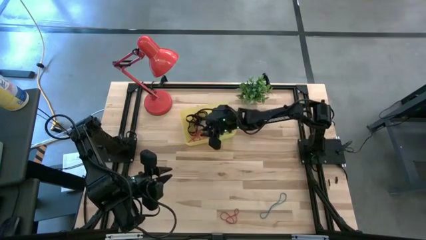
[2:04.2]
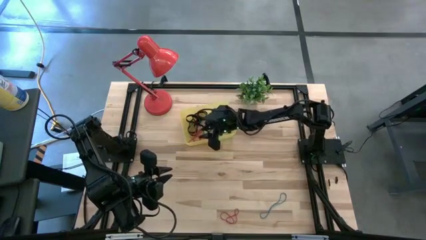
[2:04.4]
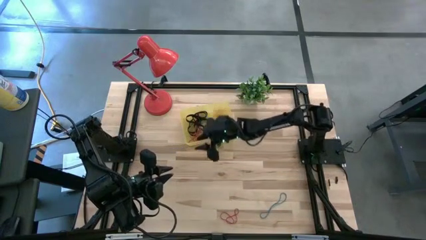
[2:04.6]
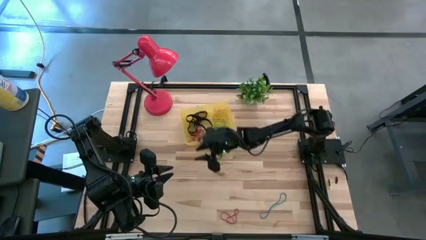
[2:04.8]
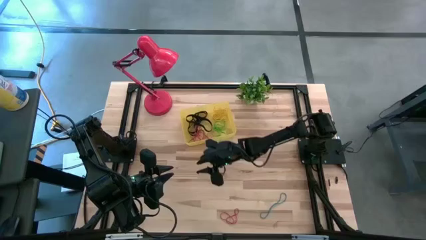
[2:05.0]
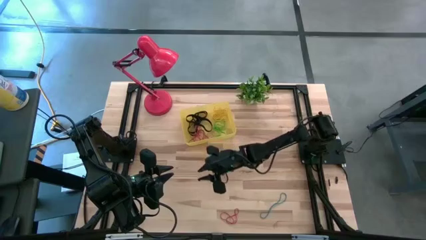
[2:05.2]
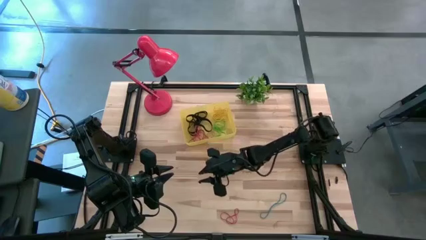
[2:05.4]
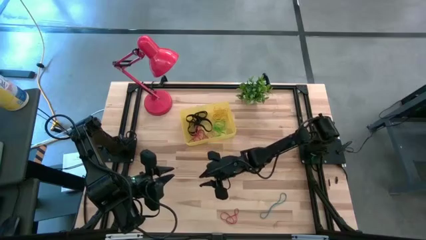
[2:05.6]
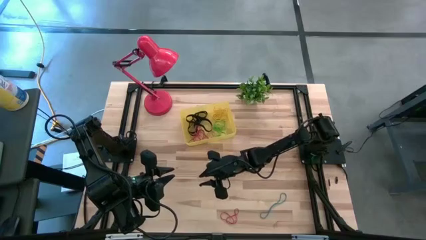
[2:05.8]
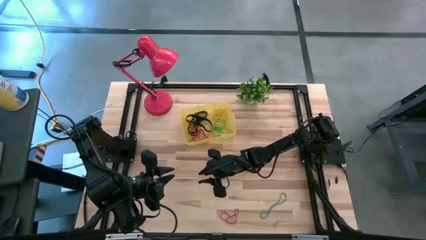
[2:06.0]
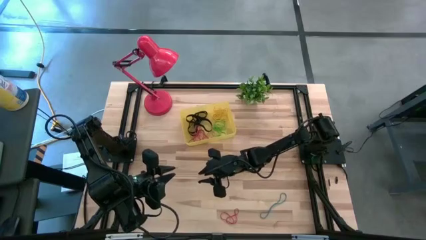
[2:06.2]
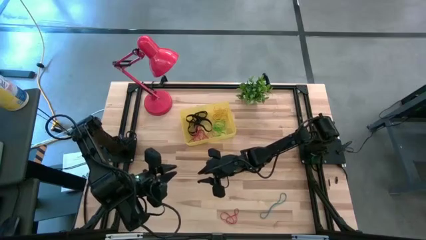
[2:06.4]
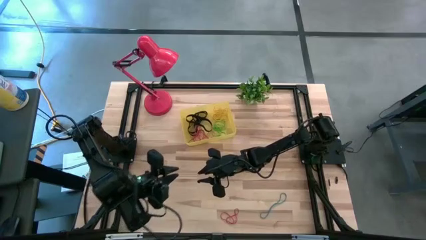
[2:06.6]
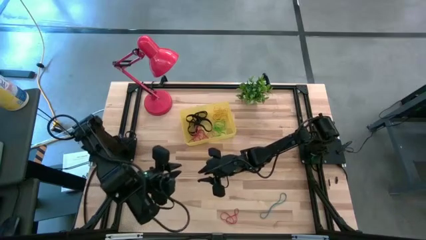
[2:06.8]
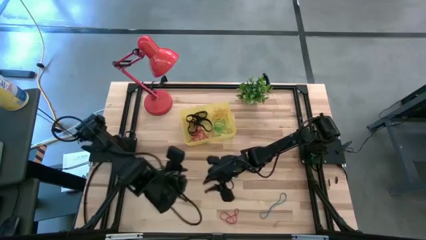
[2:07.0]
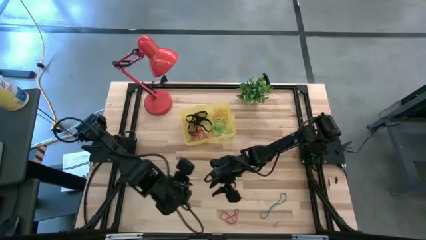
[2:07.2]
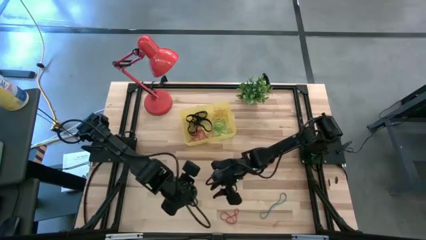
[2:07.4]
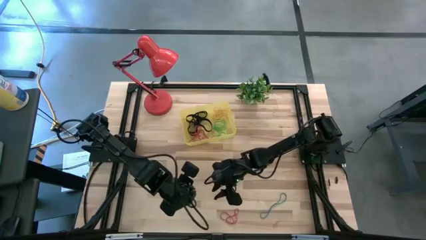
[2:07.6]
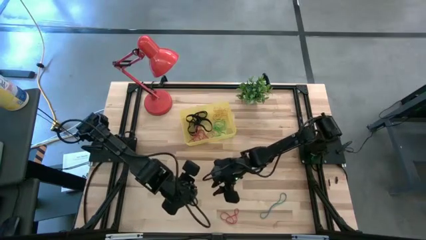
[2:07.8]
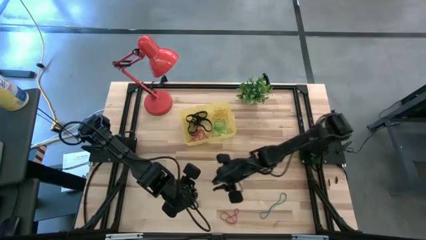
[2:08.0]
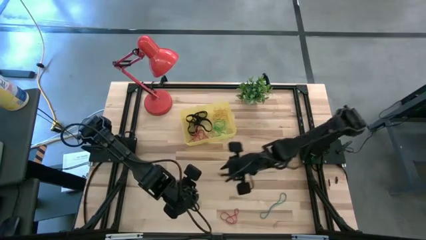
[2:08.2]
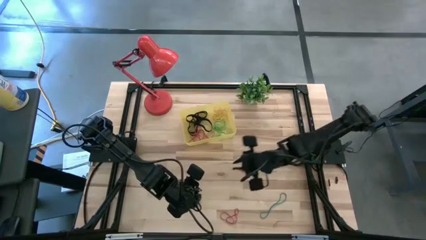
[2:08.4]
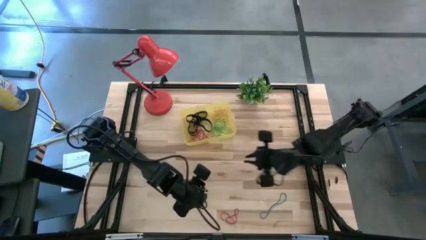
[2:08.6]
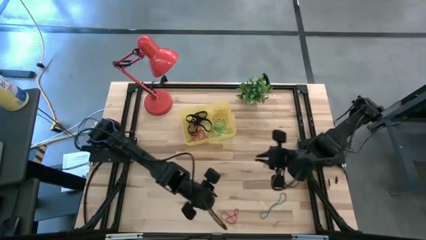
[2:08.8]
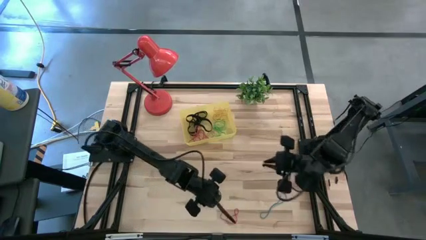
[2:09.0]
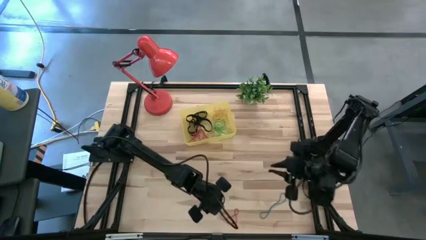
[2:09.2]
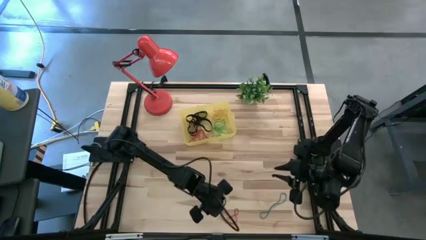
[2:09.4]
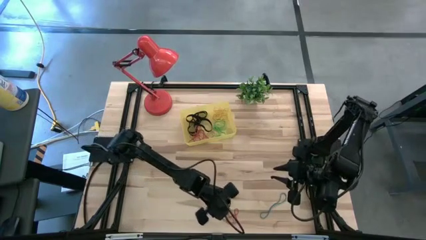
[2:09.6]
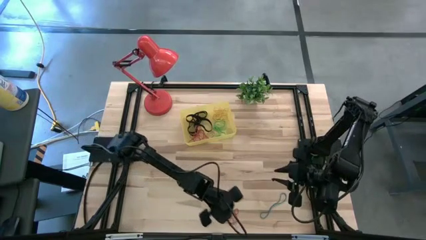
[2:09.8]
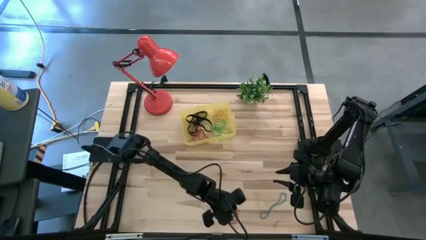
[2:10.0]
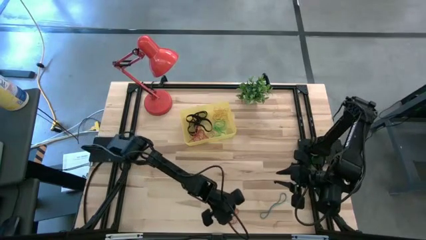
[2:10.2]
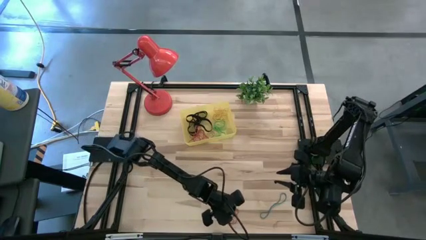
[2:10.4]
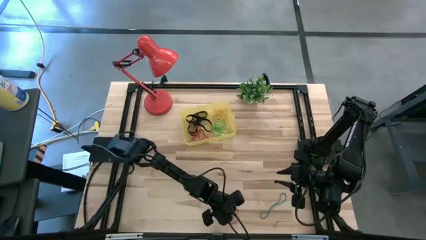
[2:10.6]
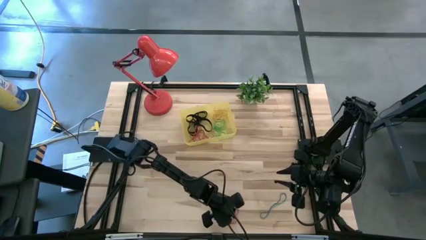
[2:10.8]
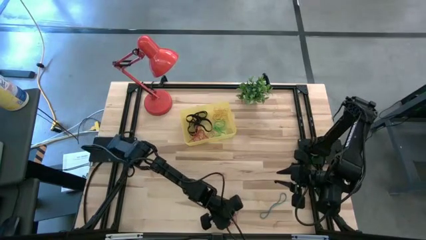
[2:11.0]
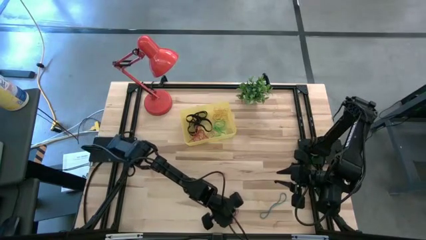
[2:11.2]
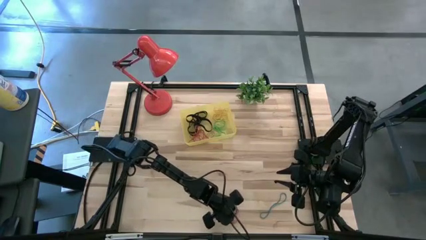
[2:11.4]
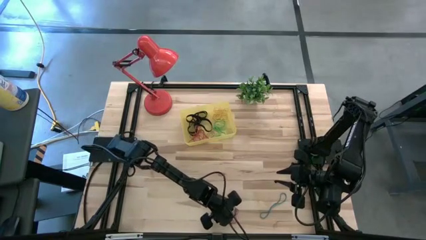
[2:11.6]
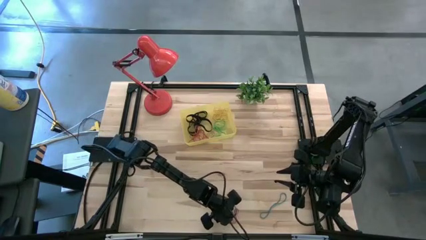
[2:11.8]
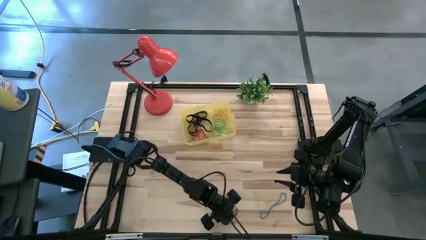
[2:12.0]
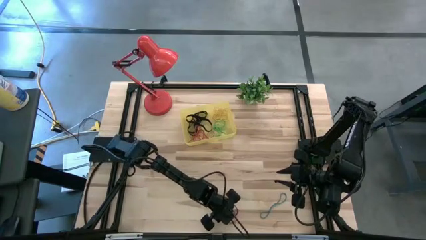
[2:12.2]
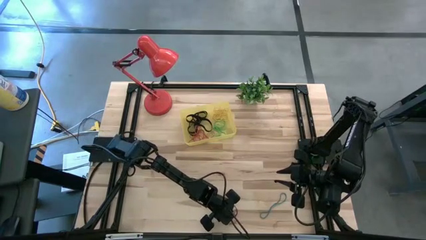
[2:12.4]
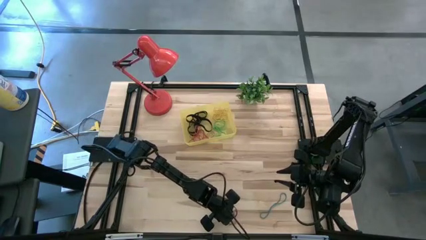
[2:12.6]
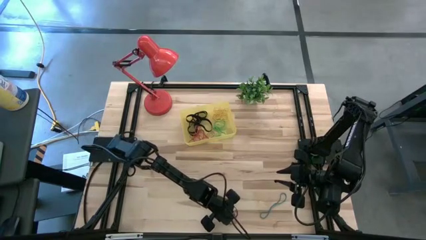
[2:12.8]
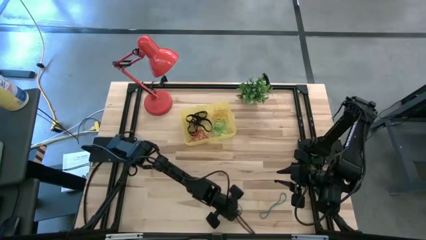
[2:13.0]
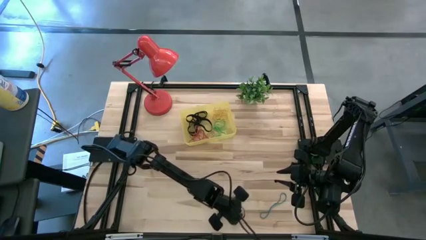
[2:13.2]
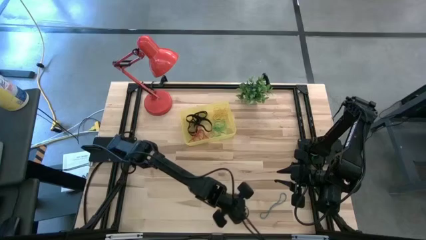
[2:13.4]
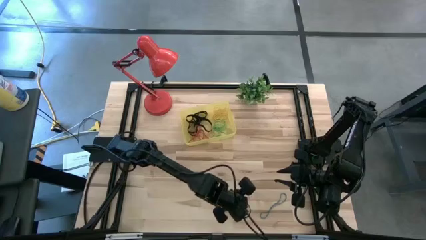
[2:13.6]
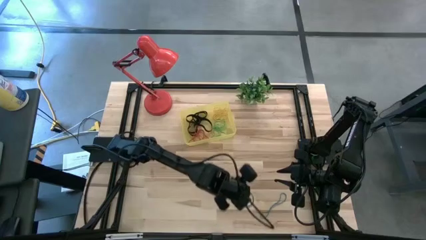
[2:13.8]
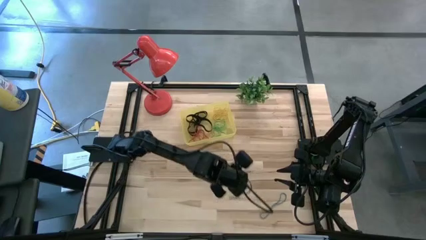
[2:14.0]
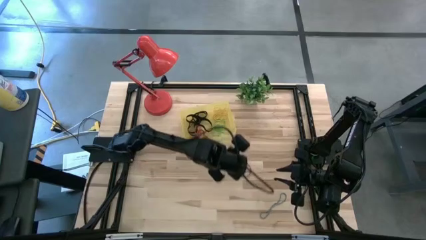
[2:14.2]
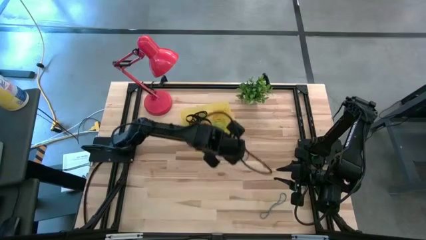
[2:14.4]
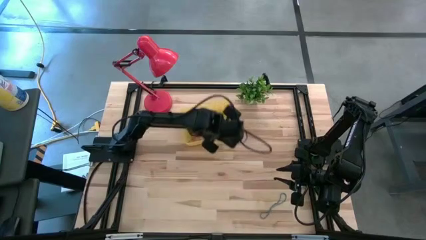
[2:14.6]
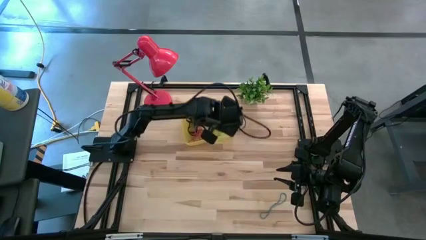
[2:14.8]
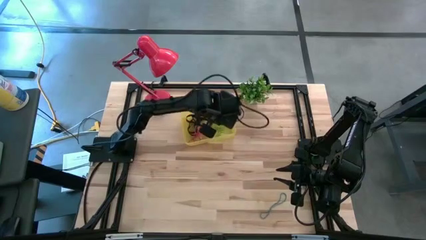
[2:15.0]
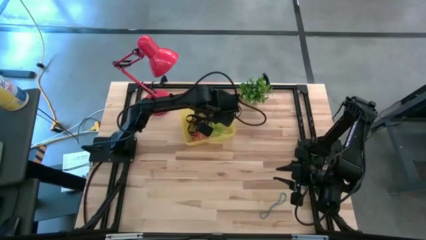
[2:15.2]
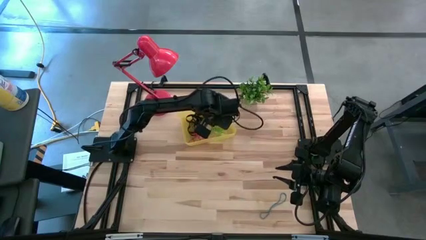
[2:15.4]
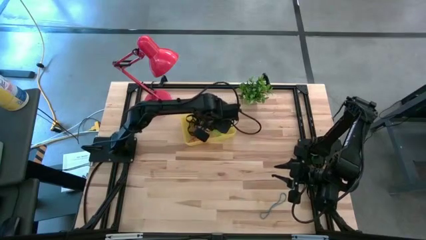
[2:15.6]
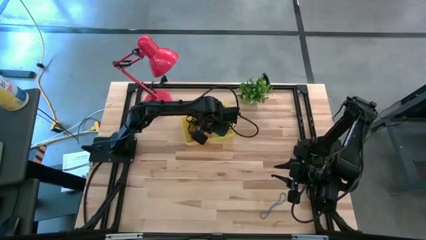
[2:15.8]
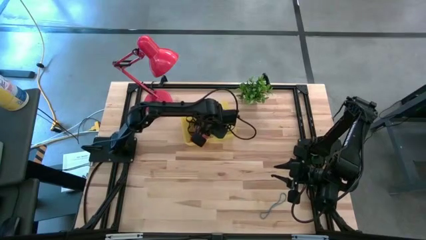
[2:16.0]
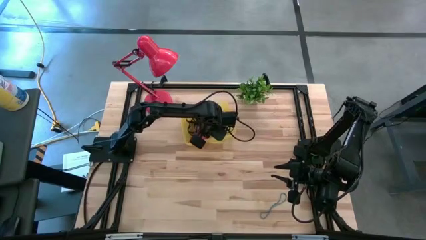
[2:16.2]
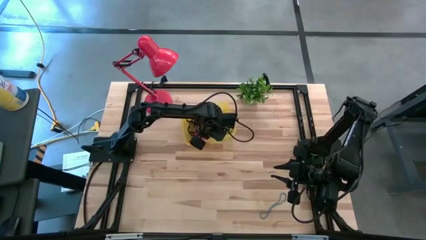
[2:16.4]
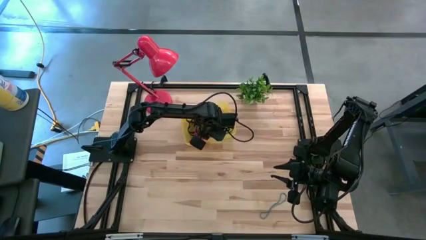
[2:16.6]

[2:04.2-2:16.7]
Task: Pick and place rubber bands into bin
Put the red rubber band into the yellow bin

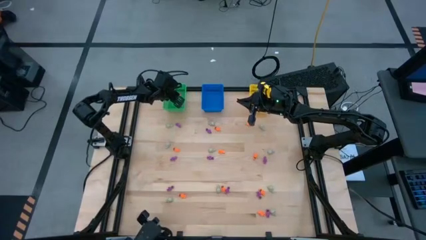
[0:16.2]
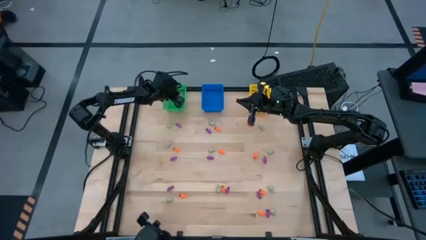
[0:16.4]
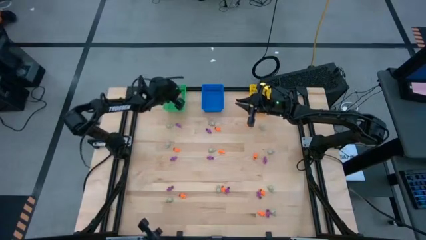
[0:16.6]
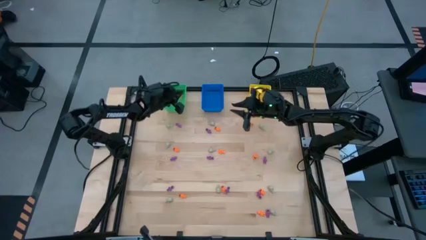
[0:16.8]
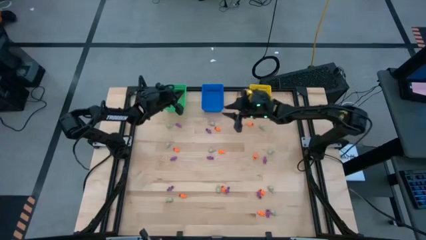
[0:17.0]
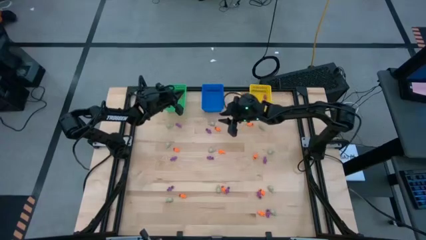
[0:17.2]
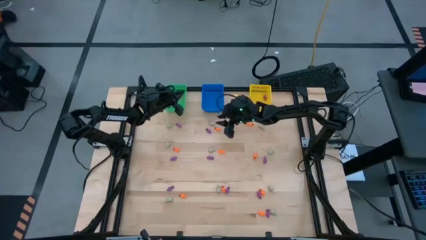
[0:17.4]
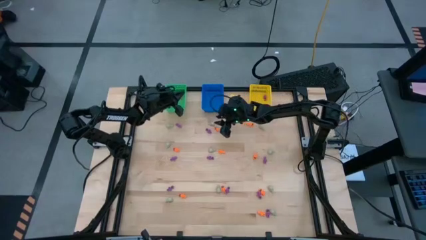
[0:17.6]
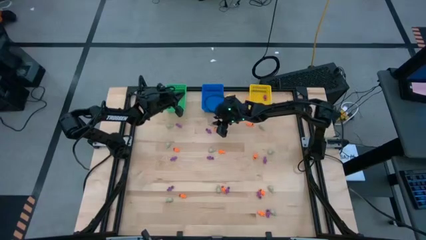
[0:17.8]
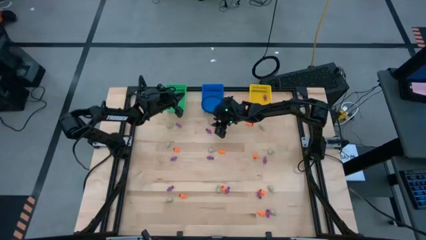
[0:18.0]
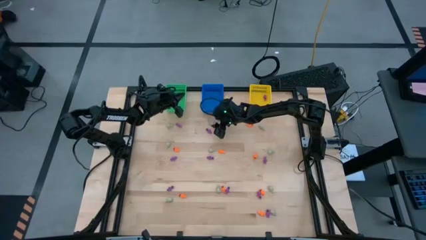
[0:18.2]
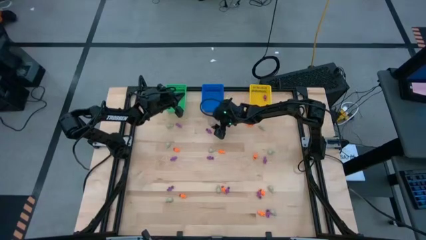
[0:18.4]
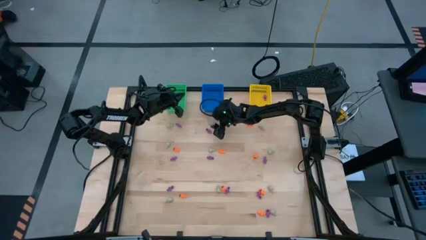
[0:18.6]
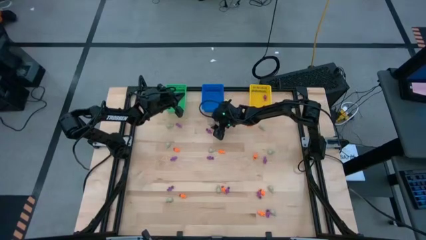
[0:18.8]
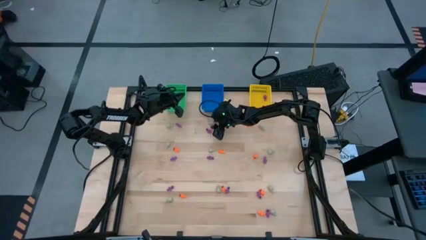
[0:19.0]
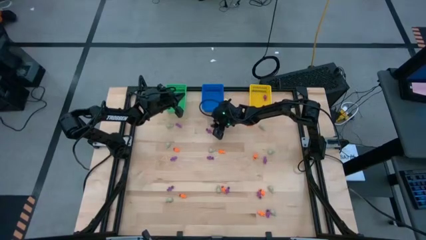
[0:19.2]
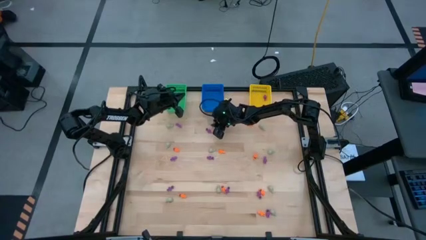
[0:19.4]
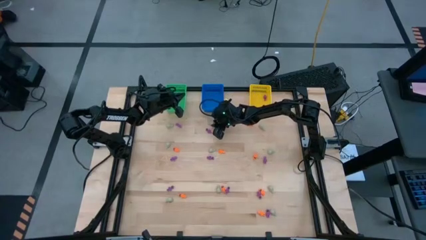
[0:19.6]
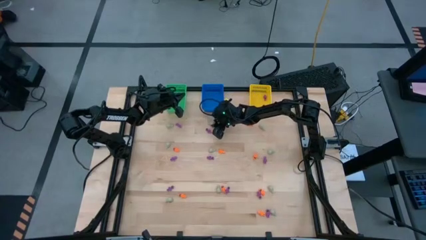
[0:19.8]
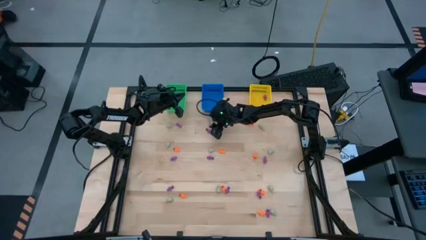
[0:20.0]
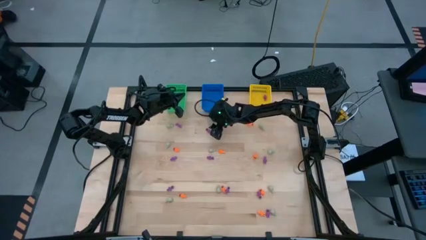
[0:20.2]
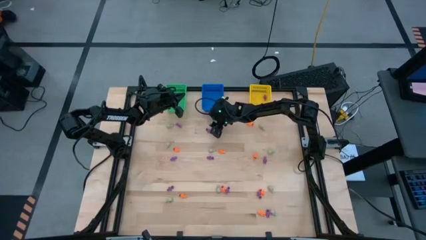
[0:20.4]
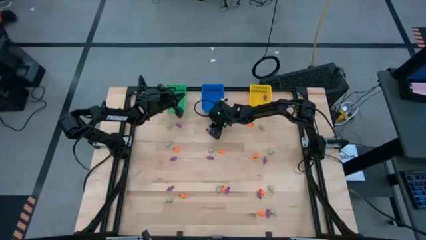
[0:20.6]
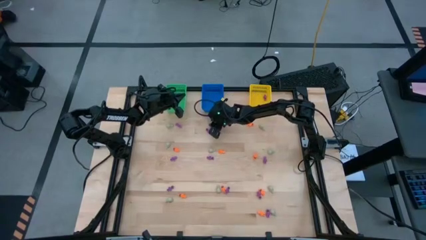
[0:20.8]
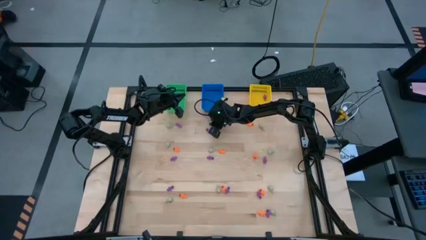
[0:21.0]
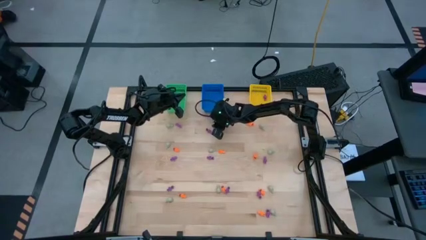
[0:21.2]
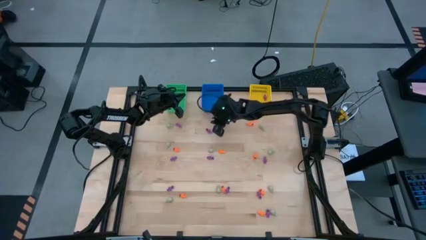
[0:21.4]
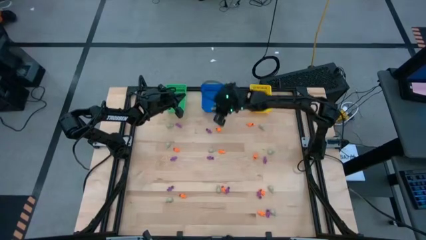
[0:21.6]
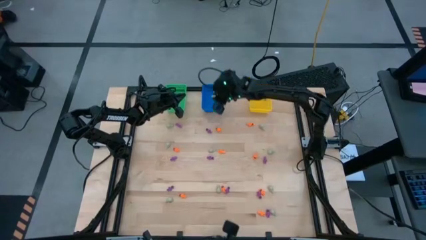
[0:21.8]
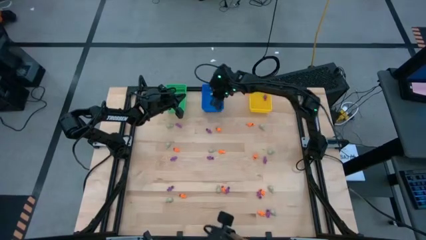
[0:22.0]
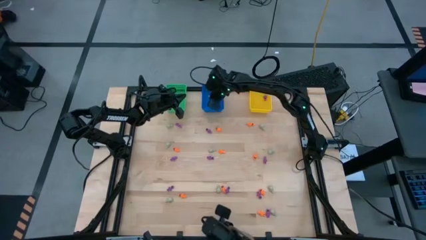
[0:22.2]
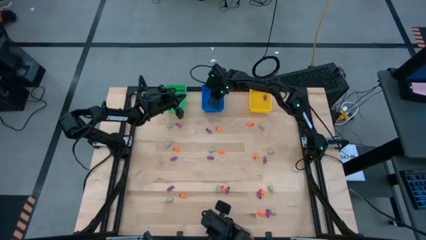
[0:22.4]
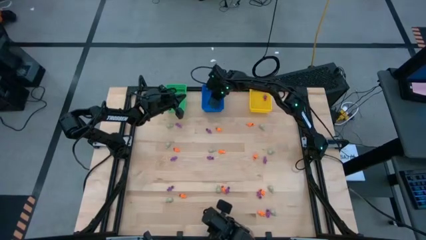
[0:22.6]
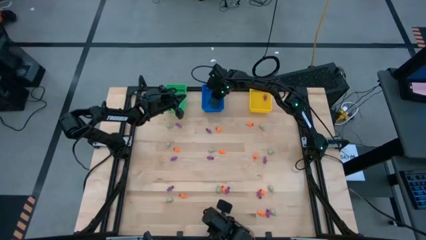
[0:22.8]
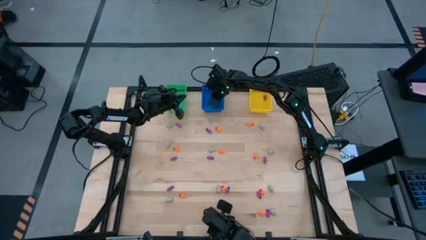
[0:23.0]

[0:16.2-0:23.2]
Task: Sort Halloween decoration
Put the white skull toy into the blue bin
